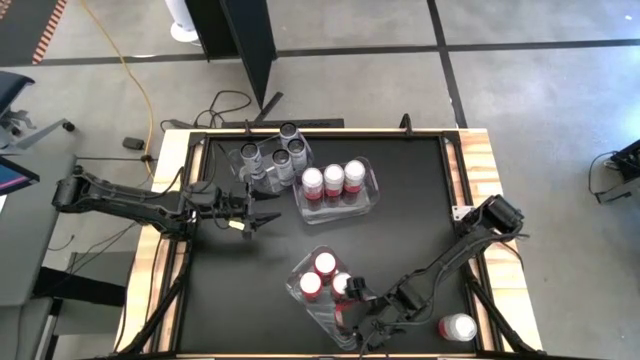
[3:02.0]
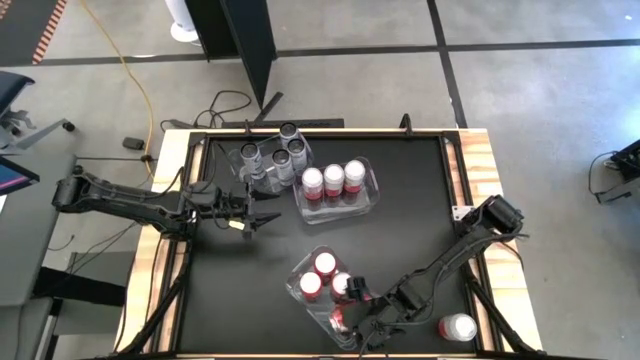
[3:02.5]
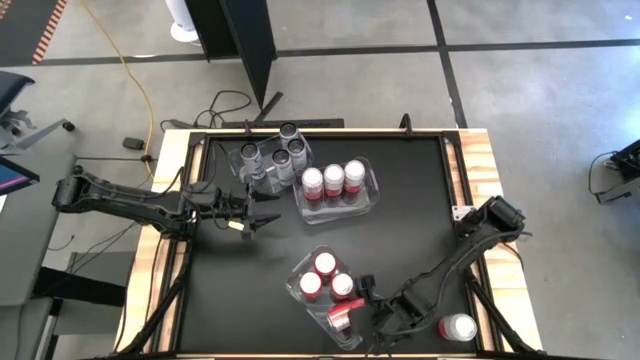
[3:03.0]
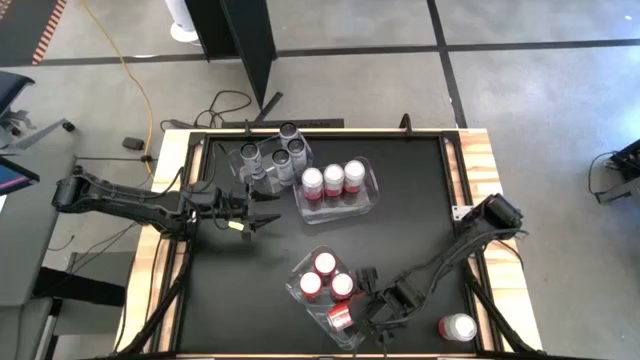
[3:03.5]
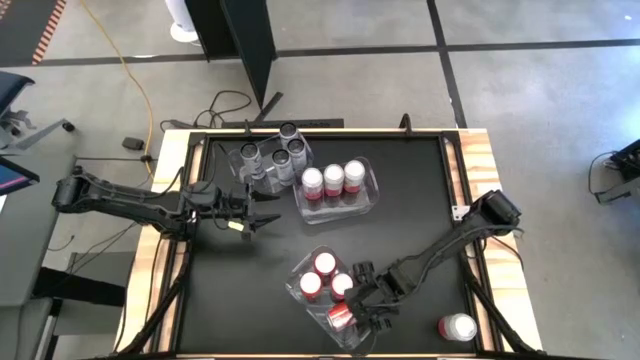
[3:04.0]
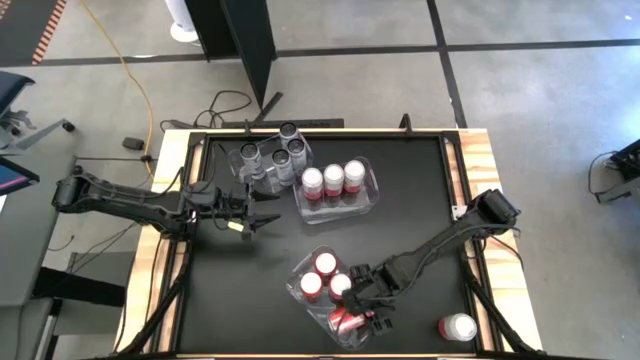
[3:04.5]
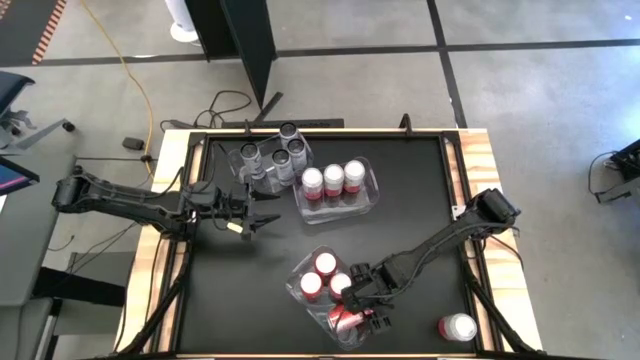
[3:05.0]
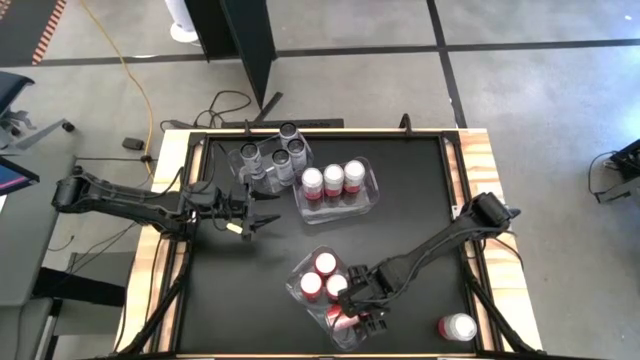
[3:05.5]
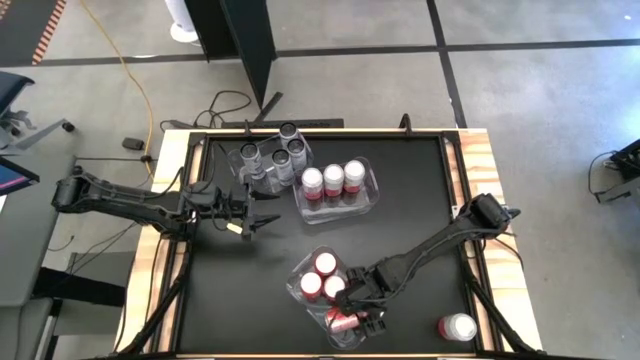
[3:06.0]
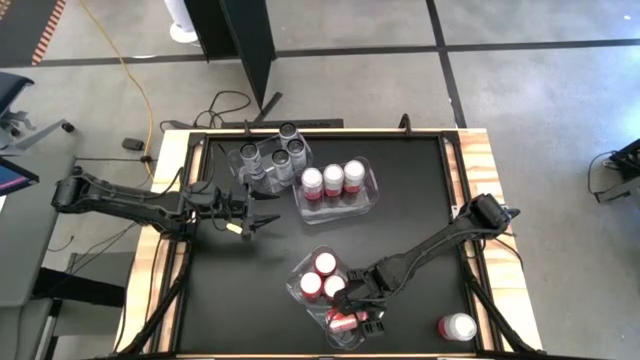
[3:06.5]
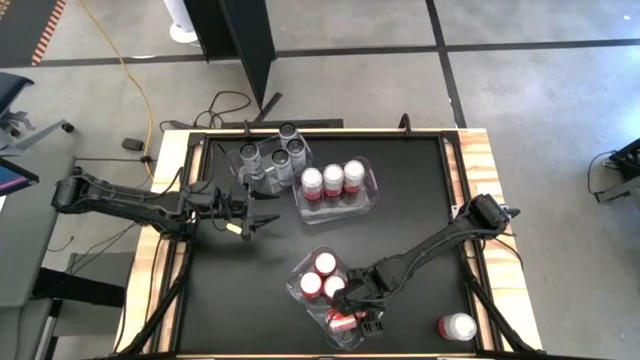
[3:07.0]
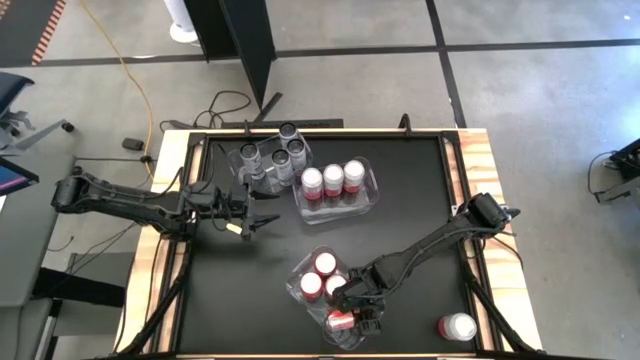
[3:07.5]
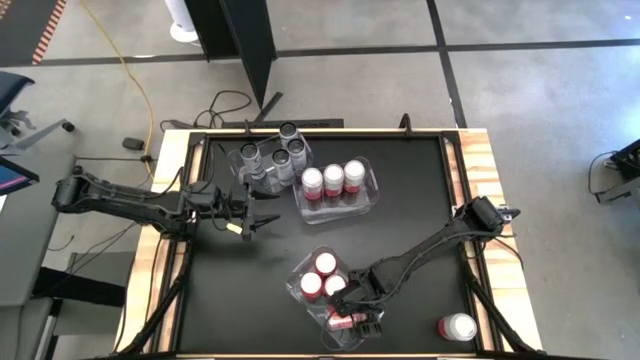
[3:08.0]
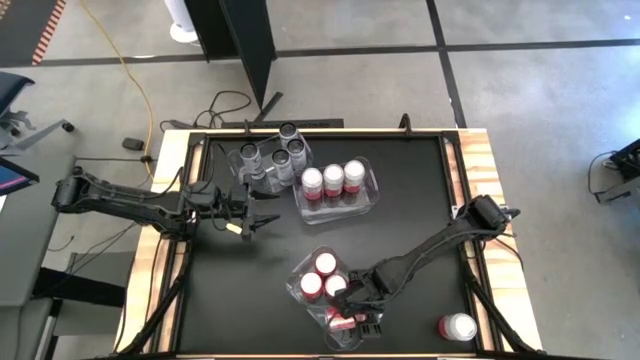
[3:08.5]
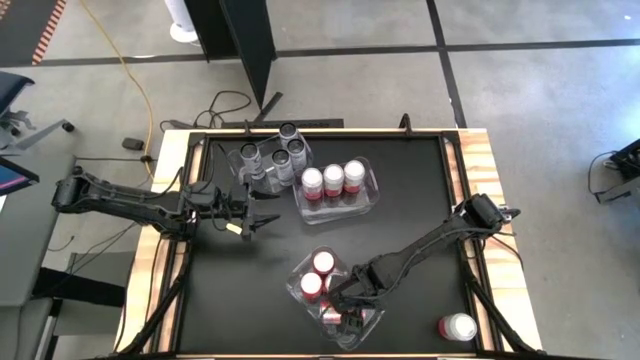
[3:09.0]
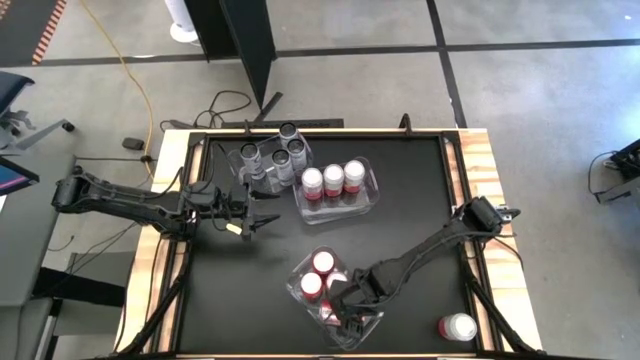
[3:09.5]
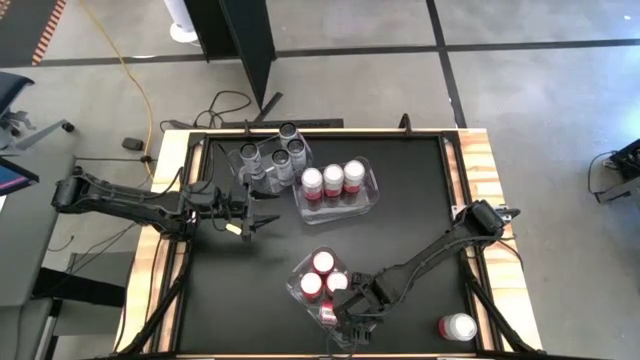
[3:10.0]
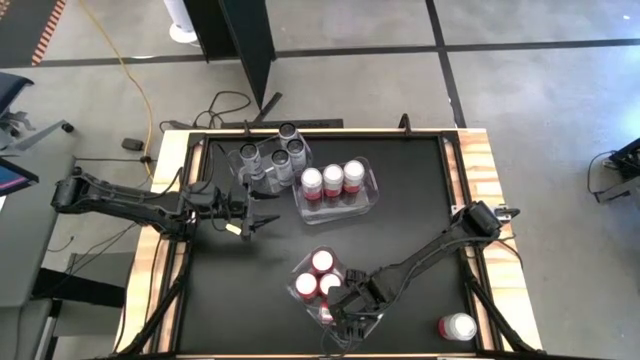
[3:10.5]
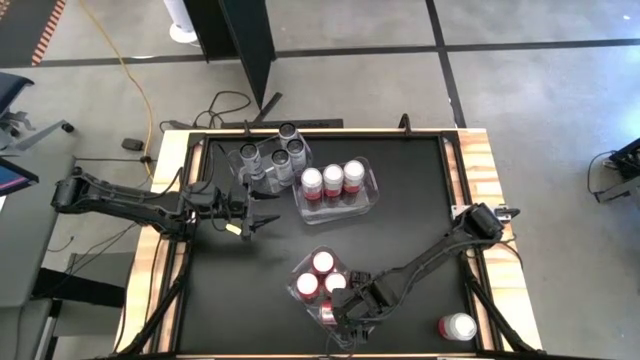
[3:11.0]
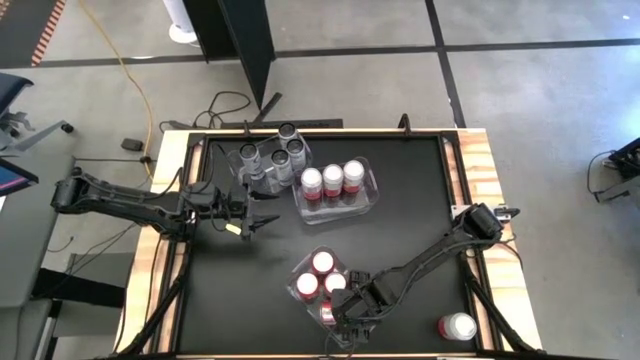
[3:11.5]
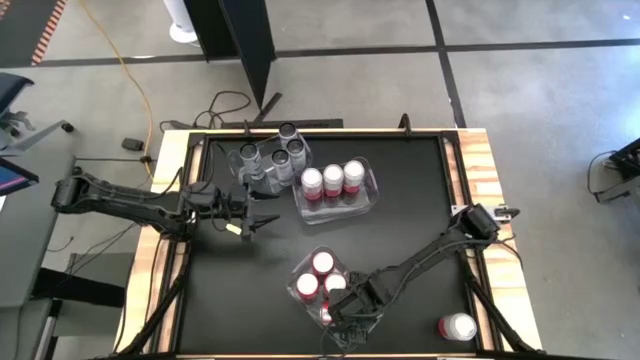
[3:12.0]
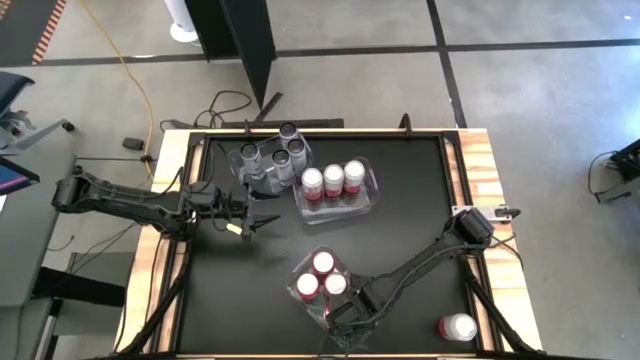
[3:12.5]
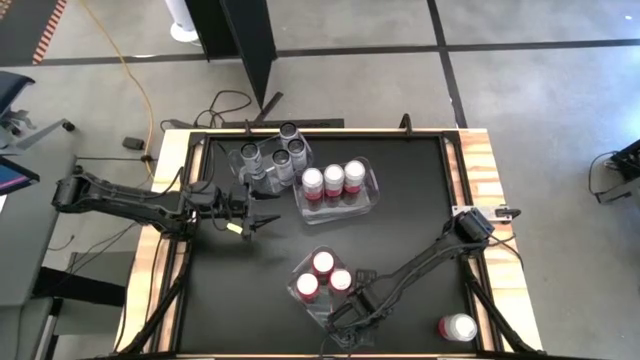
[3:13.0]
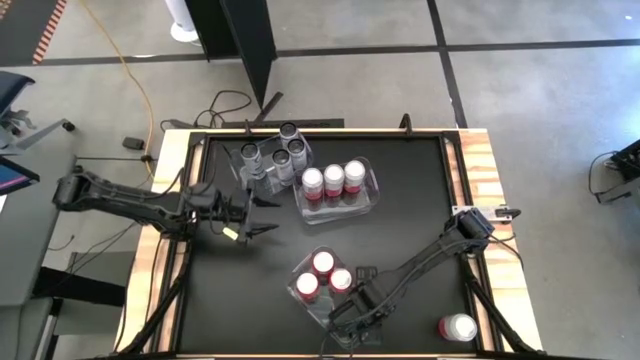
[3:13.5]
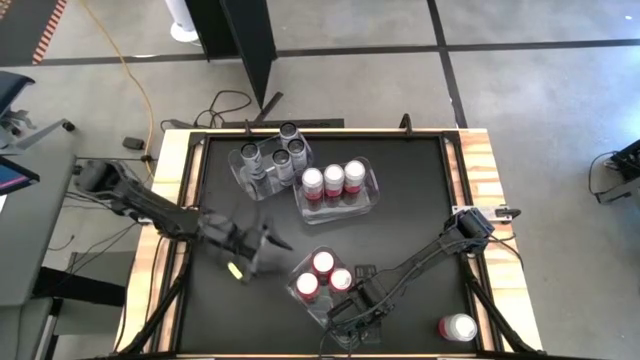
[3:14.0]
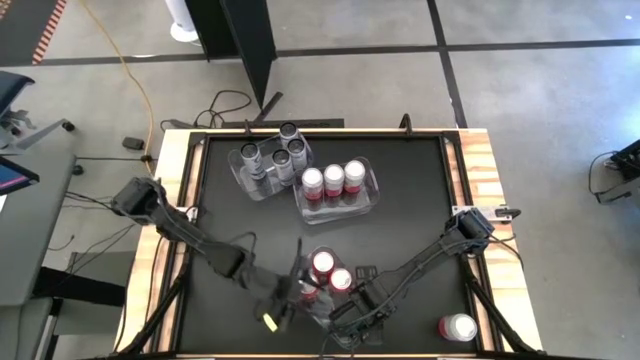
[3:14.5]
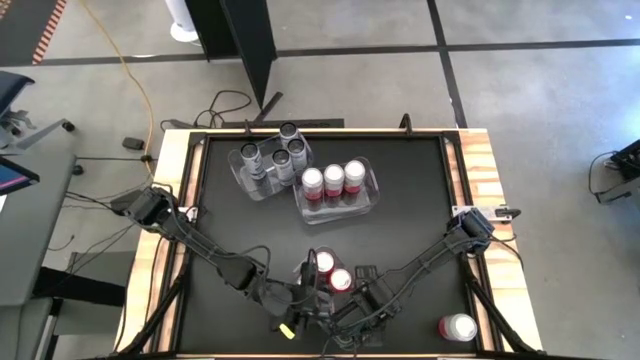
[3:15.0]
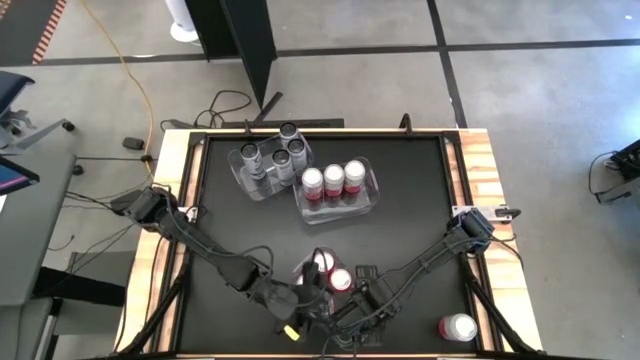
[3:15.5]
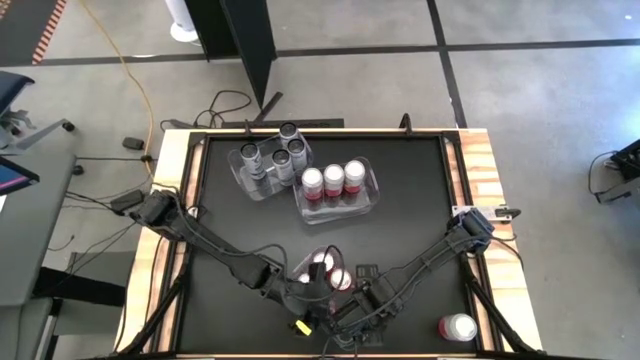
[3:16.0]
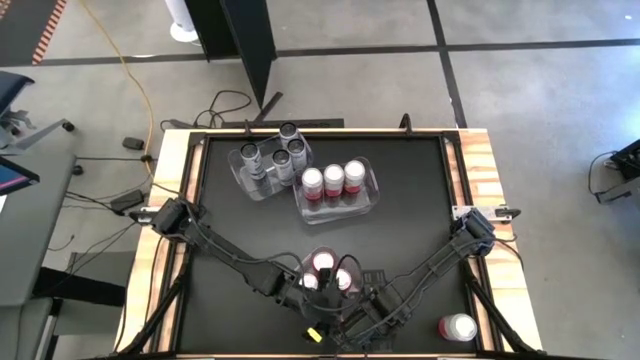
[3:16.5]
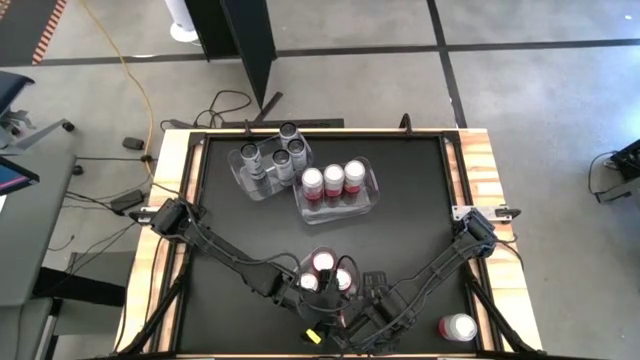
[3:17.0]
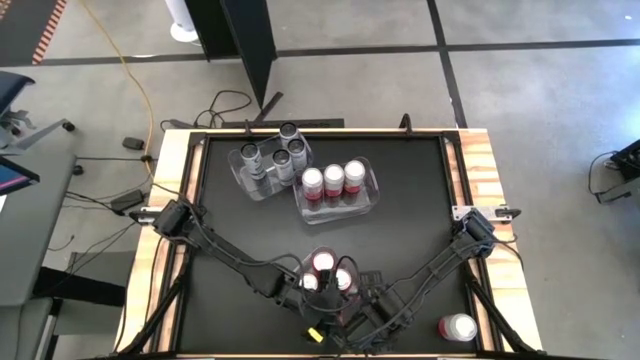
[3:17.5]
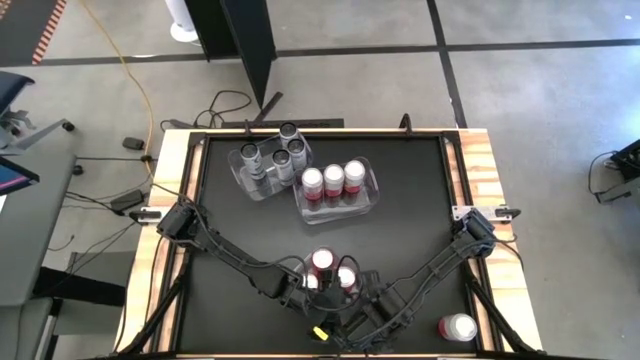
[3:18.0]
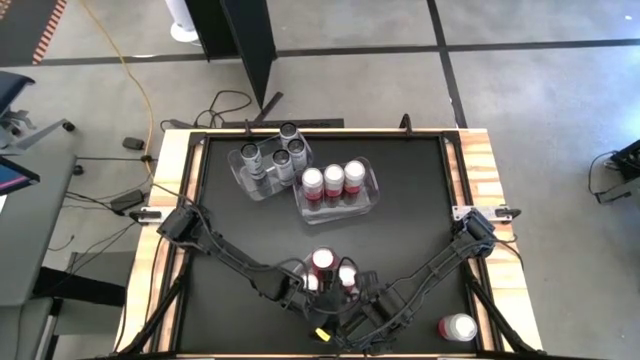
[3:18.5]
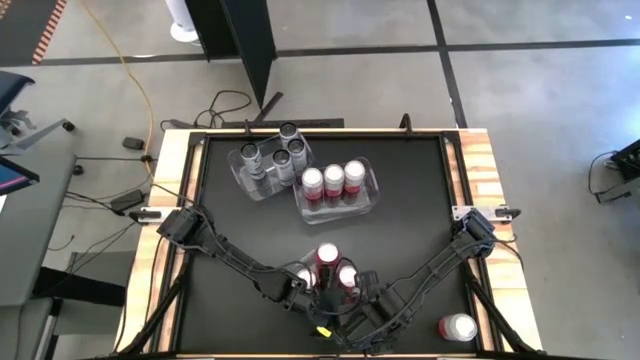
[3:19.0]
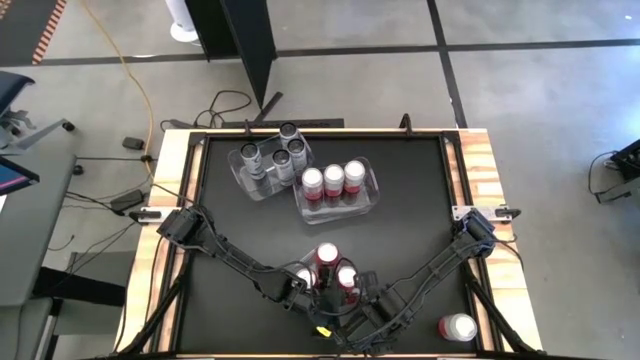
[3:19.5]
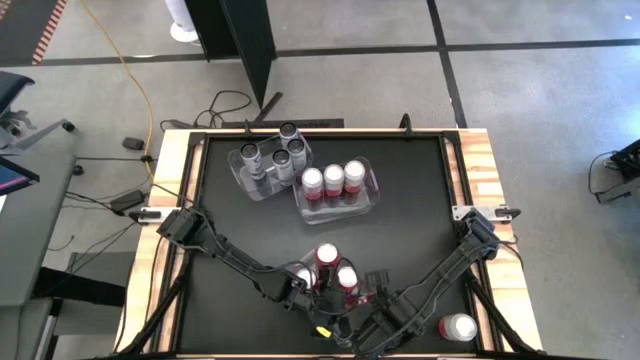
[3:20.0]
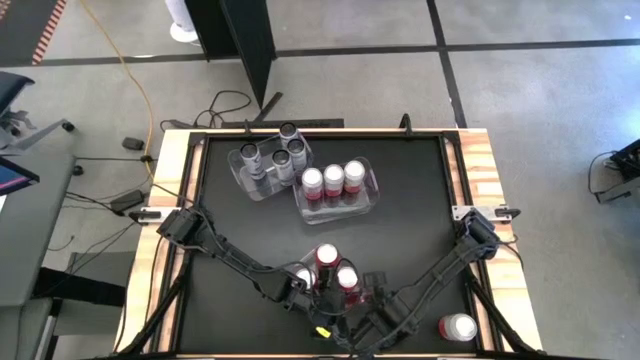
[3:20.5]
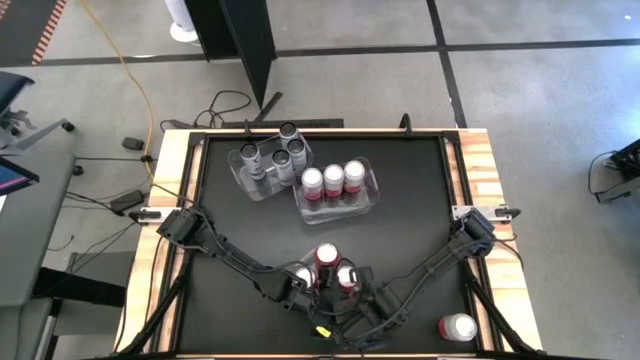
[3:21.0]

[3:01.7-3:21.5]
Task: Sort soda cans
Put the orange soda can in the bottom transparent bin
